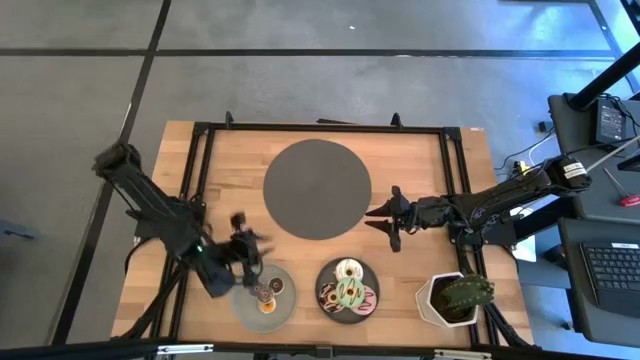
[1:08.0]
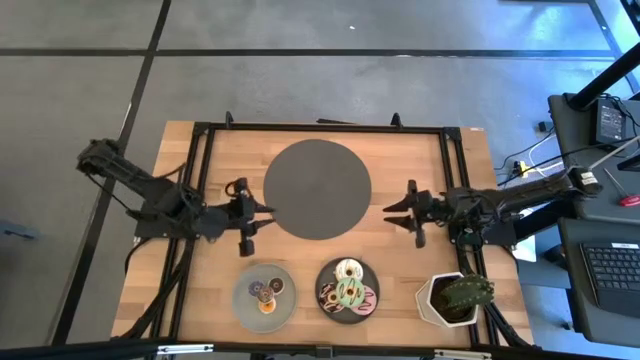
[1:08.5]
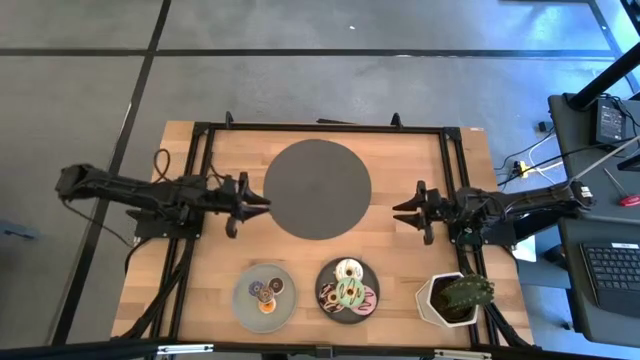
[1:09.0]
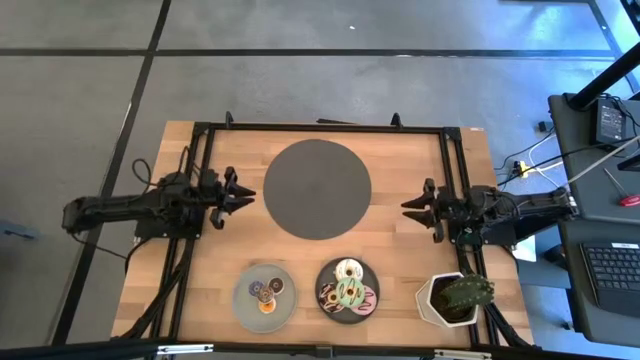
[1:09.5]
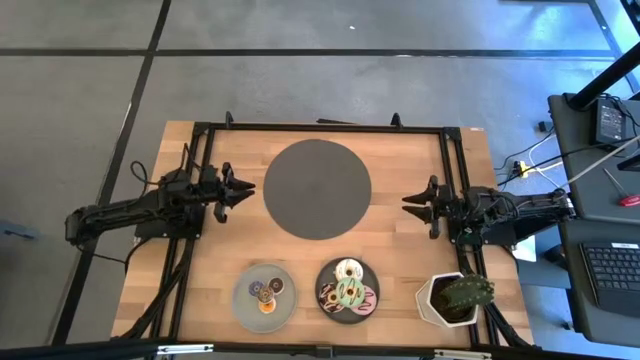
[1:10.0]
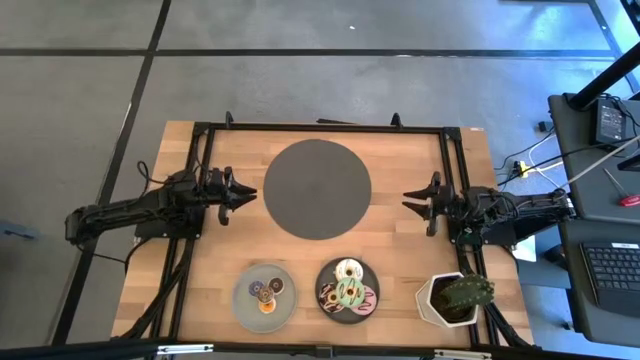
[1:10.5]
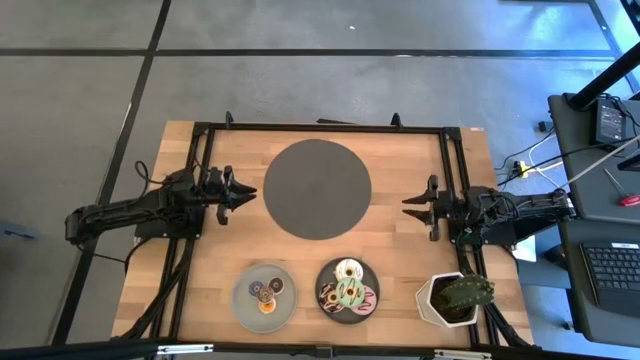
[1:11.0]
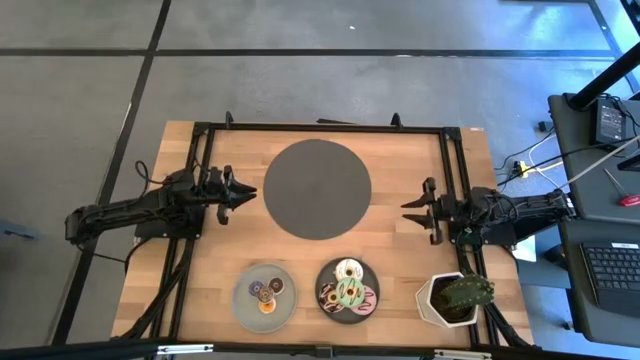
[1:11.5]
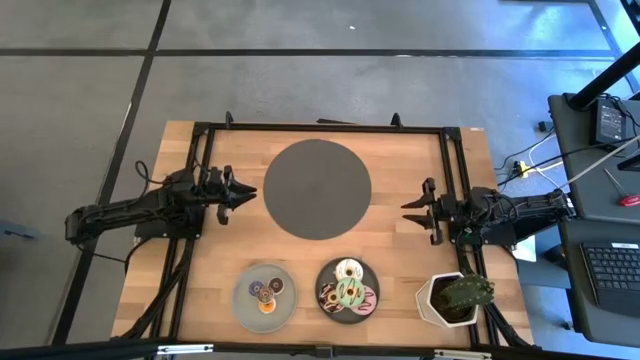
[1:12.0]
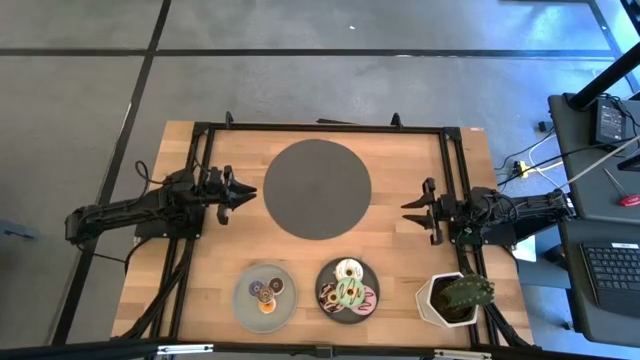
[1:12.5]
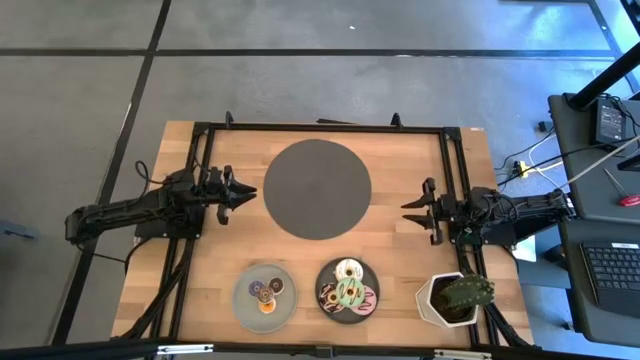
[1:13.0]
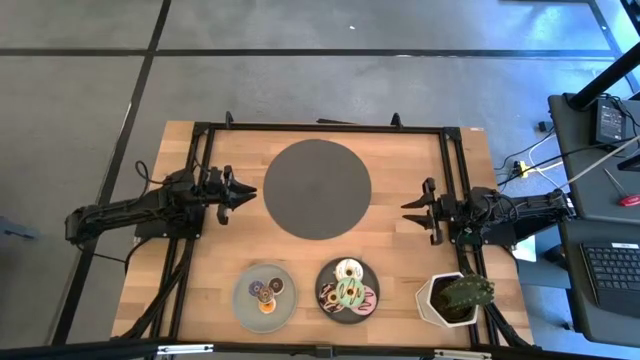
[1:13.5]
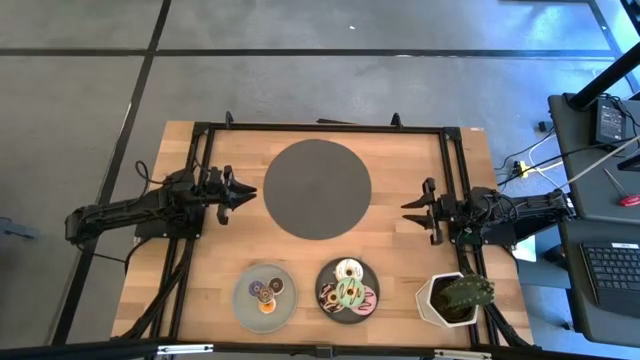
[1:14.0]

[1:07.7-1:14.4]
Task: Pick & Place donuts
Return to Home Position

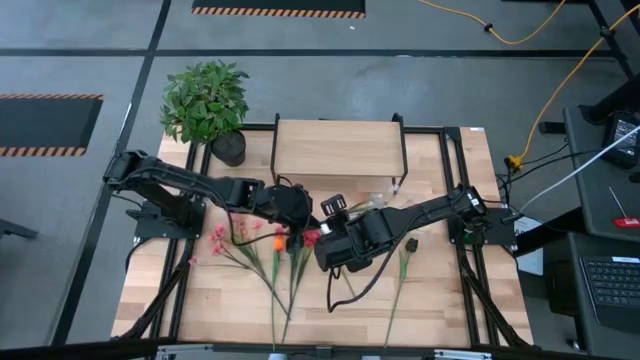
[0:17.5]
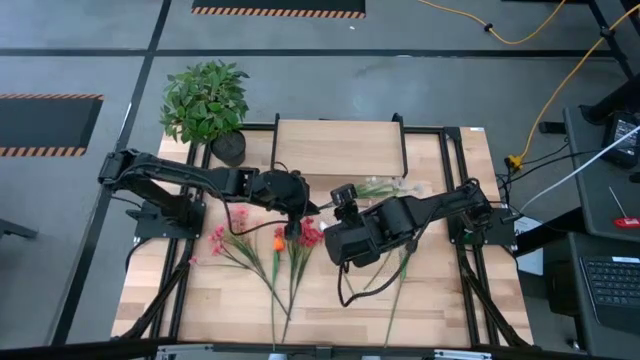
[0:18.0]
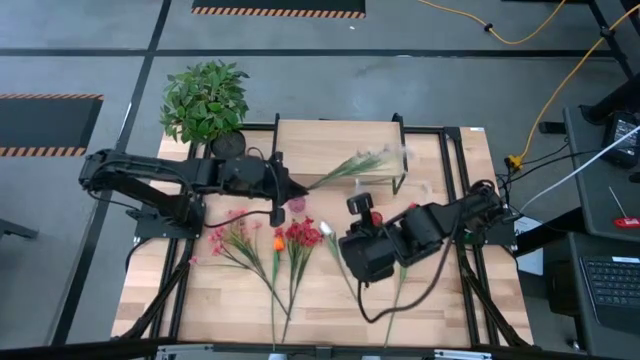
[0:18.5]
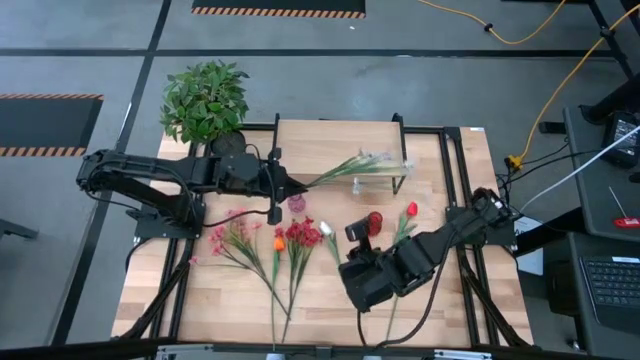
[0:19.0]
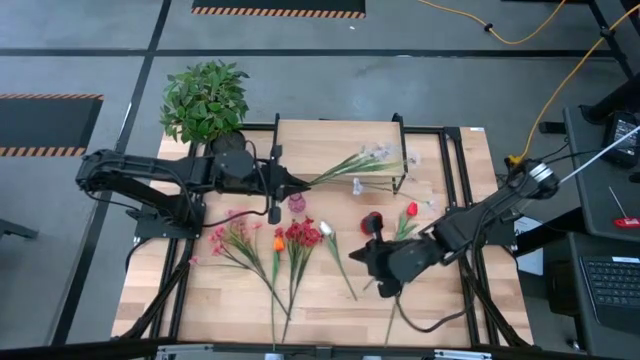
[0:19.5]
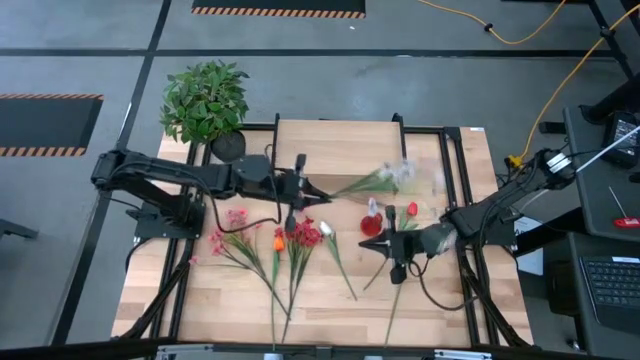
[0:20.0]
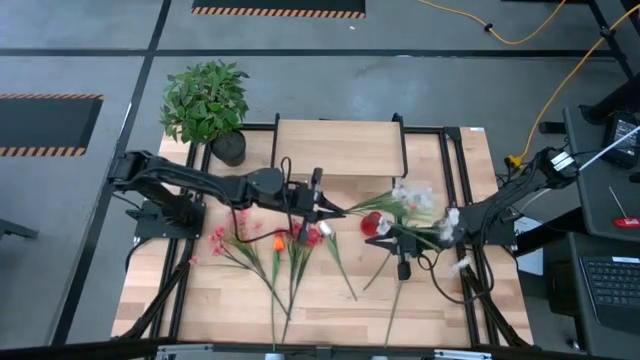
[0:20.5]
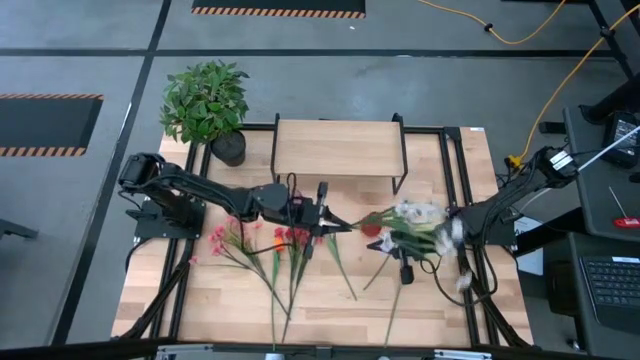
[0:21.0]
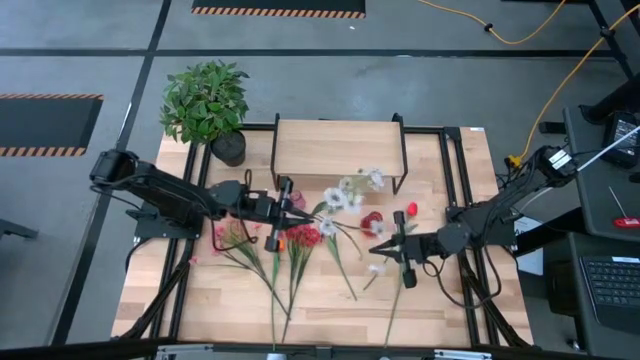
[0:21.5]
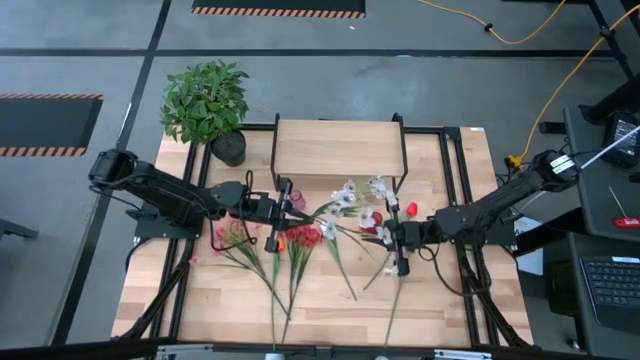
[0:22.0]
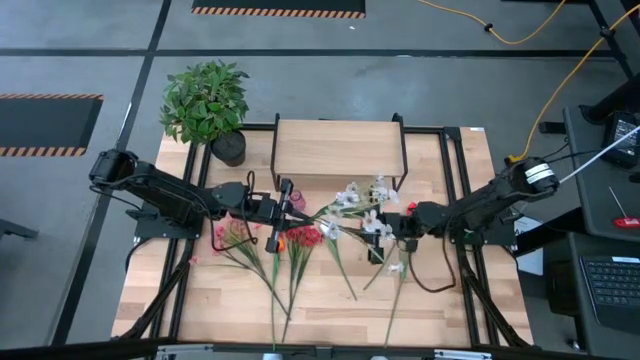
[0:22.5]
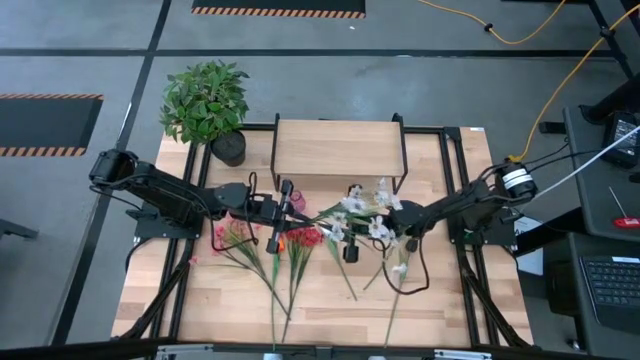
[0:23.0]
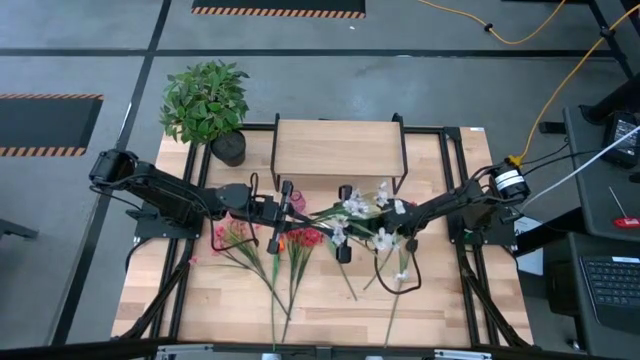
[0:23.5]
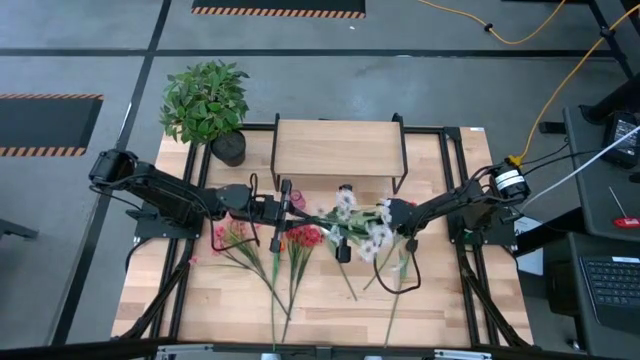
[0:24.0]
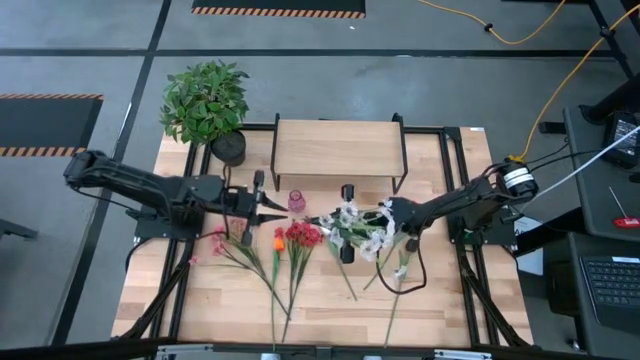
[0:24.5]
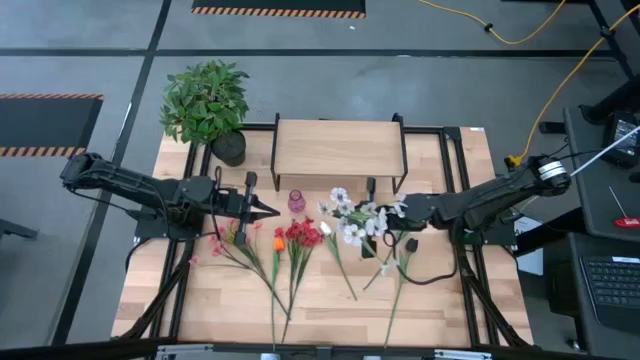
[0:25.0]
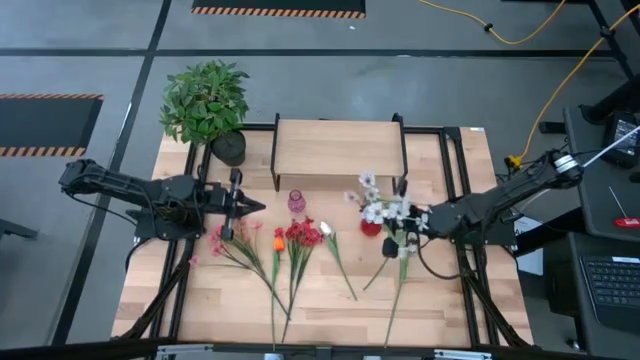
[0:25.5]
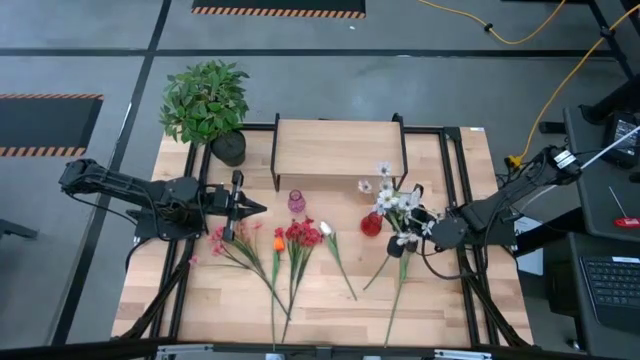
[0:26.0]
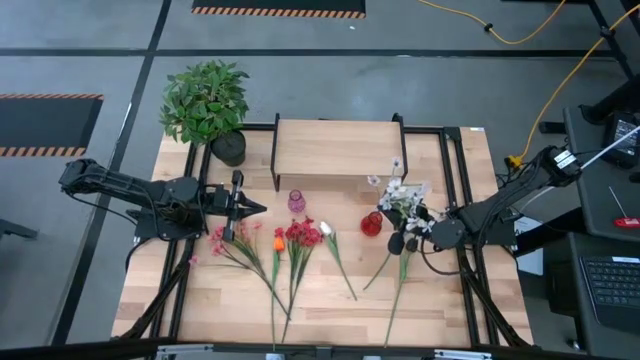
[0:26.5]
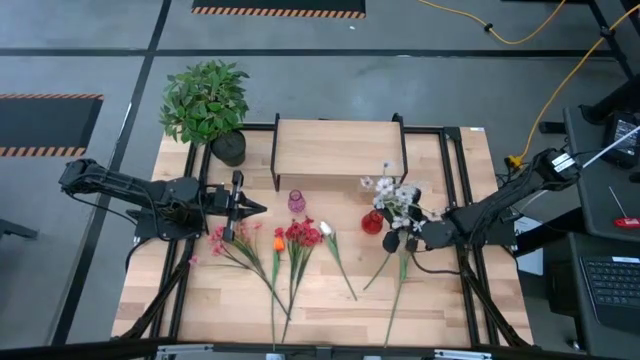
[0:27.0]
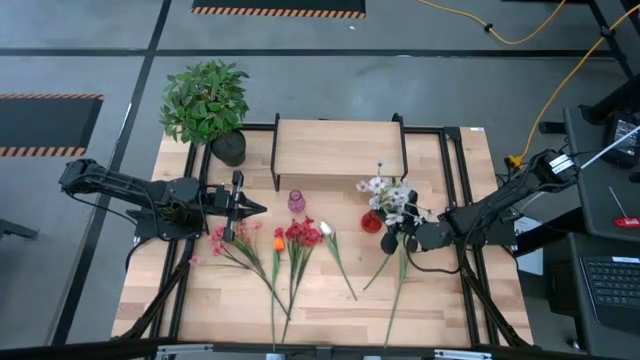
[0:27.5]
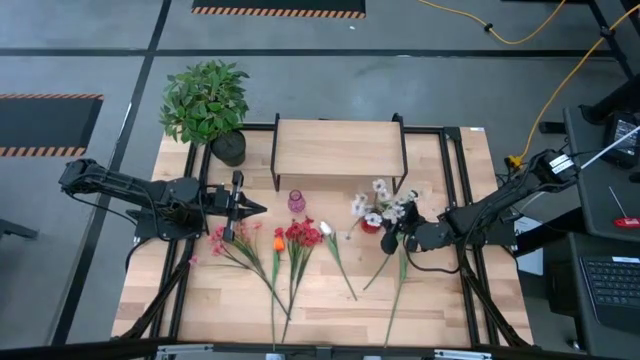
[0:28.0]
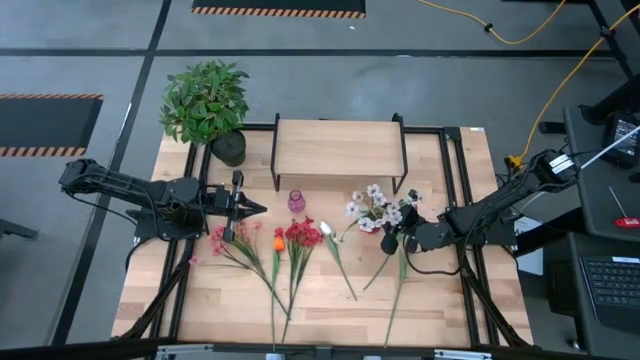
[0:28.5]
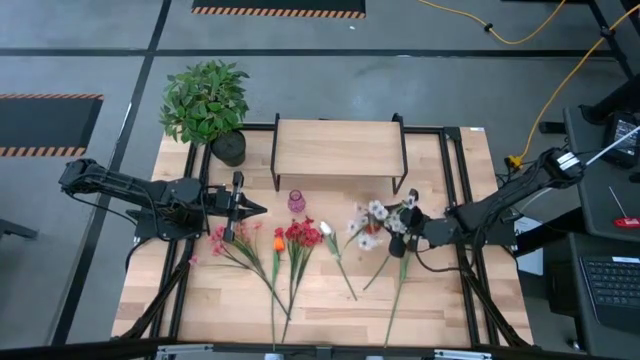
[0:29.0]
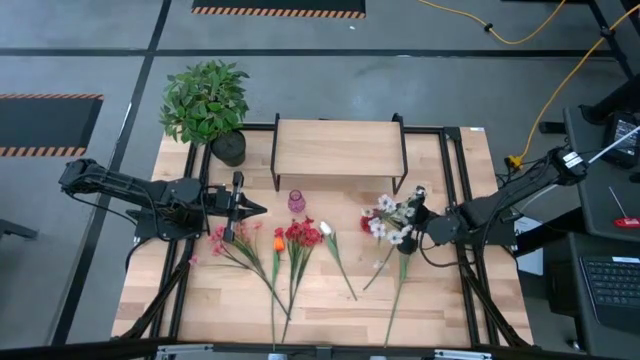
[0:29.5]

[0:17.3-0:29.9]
Task: Pick and place flowers into a vace then onto a shelf
Put the white flowers into the red vase
